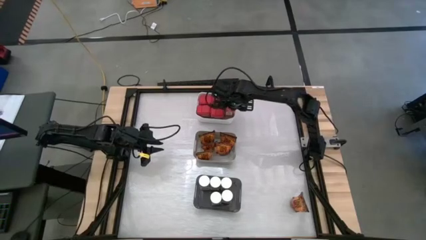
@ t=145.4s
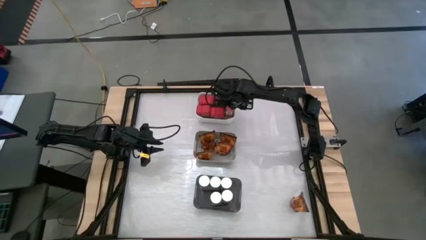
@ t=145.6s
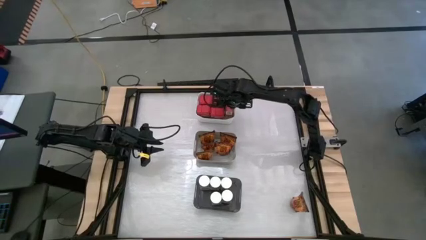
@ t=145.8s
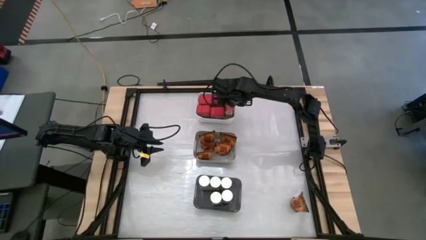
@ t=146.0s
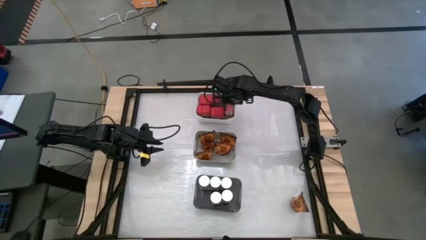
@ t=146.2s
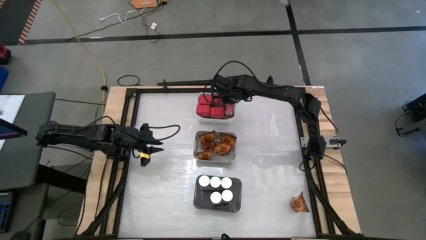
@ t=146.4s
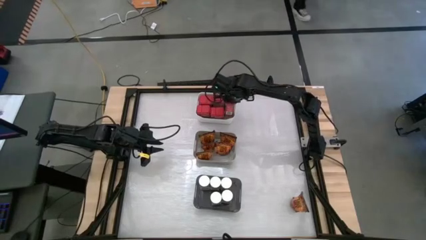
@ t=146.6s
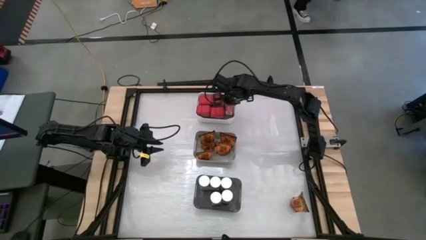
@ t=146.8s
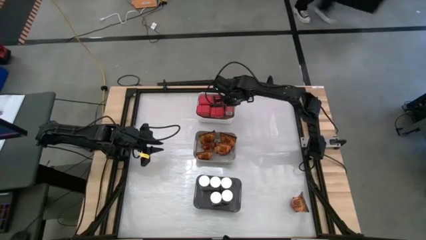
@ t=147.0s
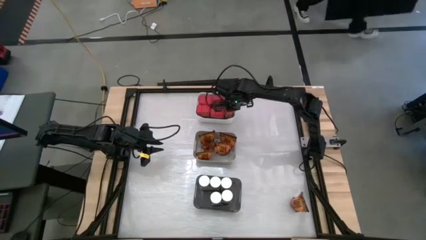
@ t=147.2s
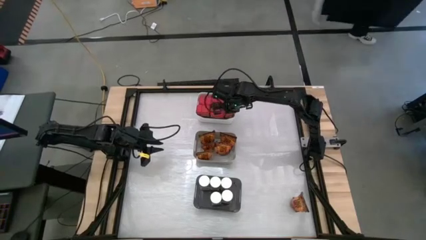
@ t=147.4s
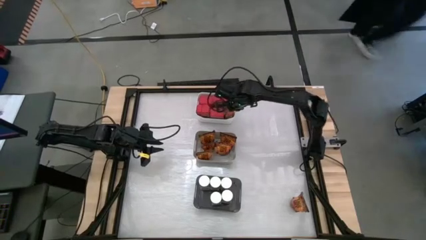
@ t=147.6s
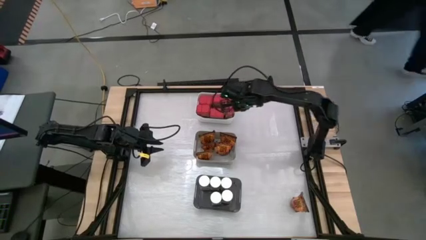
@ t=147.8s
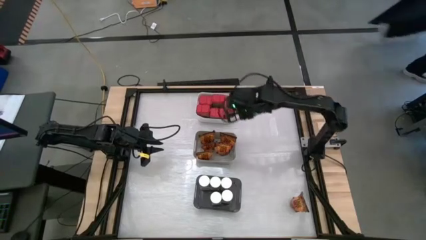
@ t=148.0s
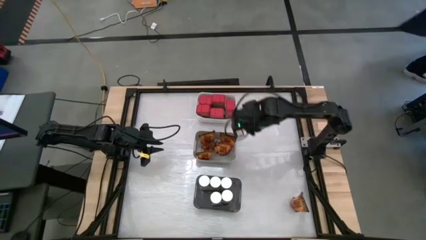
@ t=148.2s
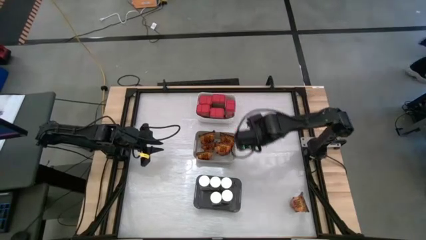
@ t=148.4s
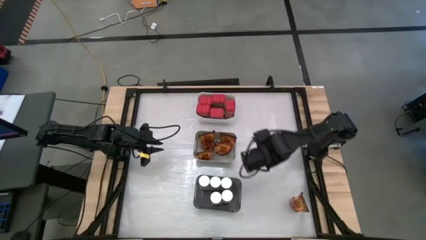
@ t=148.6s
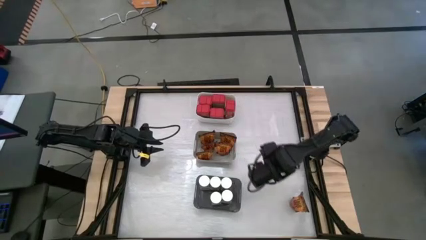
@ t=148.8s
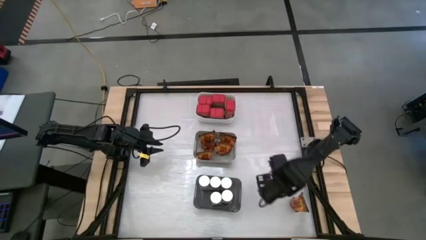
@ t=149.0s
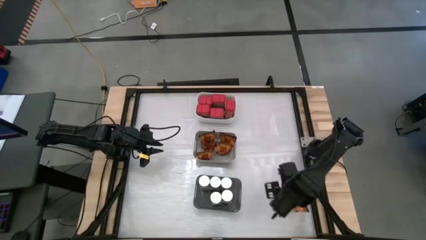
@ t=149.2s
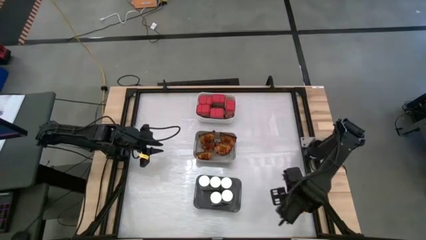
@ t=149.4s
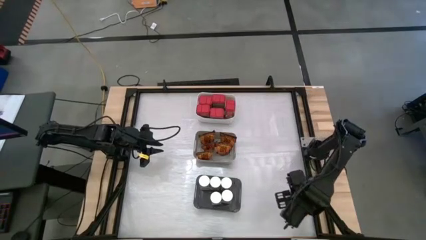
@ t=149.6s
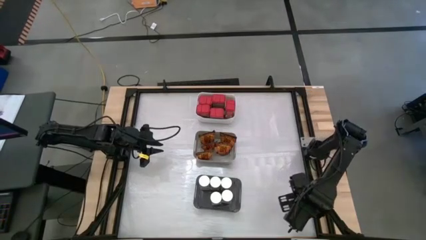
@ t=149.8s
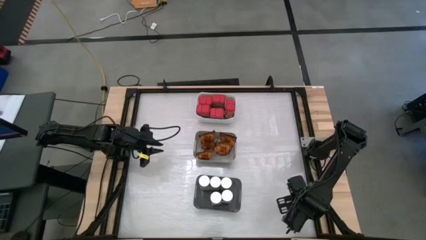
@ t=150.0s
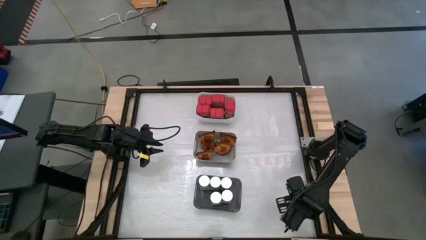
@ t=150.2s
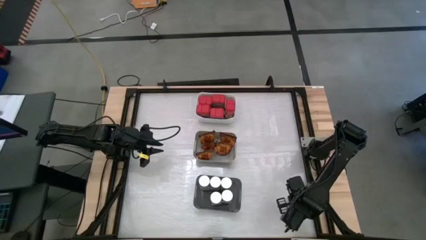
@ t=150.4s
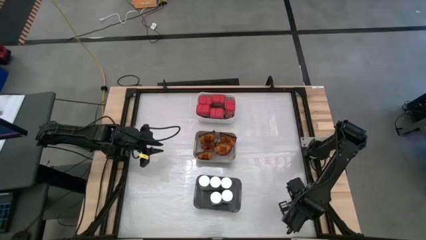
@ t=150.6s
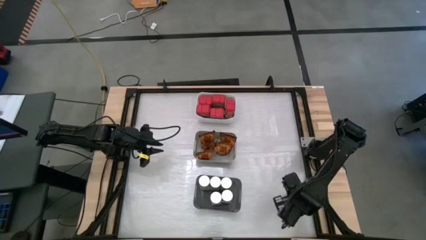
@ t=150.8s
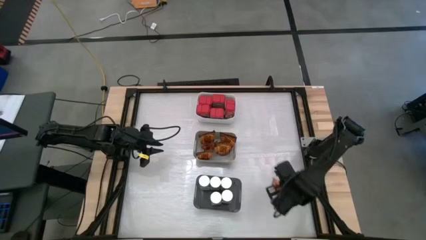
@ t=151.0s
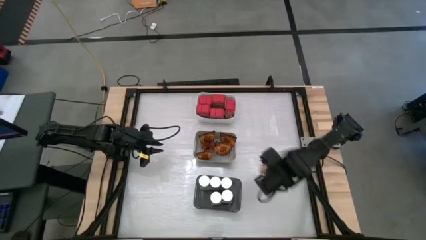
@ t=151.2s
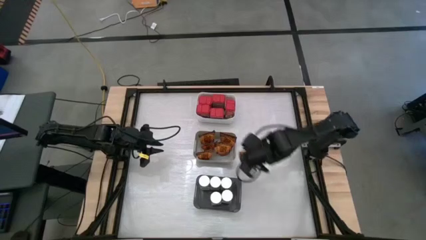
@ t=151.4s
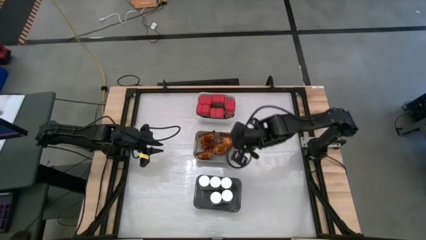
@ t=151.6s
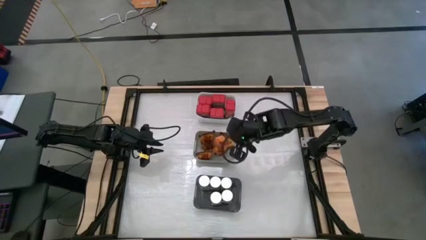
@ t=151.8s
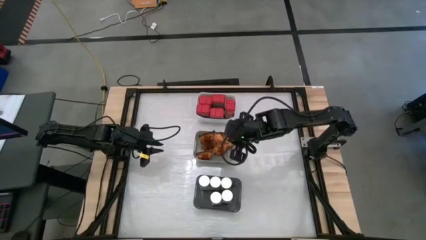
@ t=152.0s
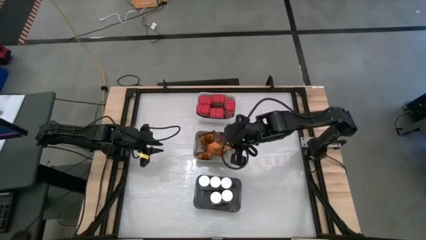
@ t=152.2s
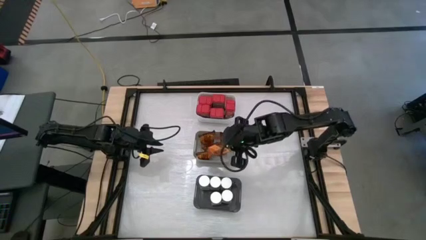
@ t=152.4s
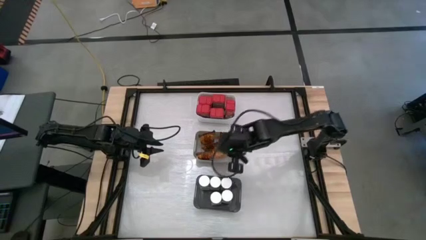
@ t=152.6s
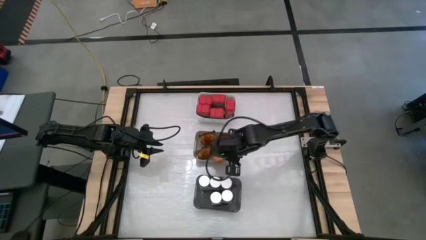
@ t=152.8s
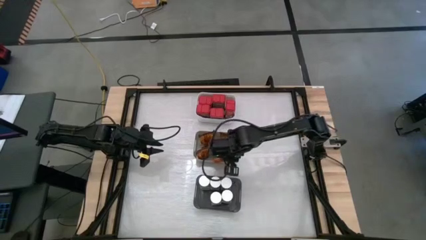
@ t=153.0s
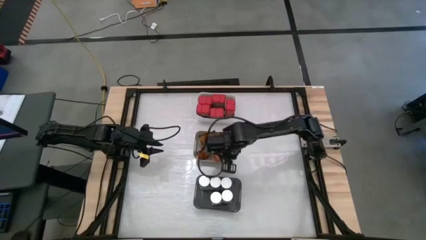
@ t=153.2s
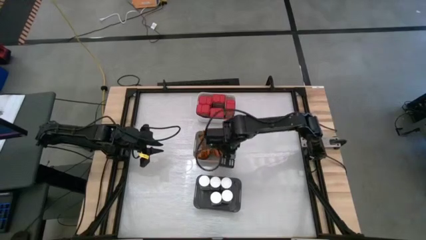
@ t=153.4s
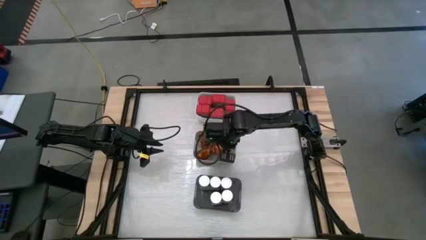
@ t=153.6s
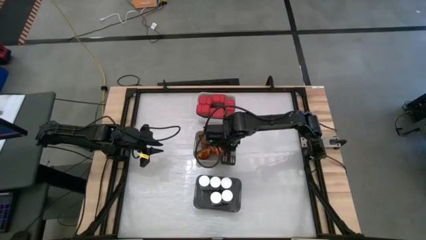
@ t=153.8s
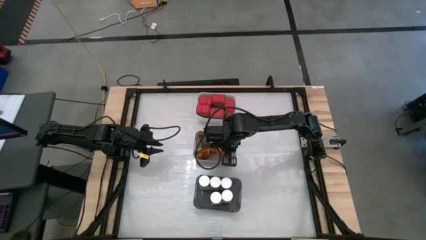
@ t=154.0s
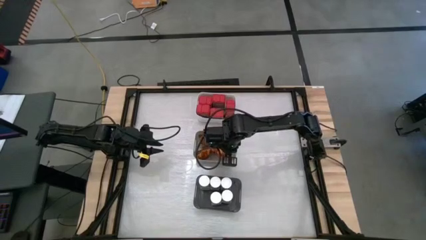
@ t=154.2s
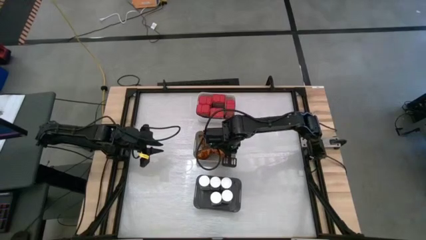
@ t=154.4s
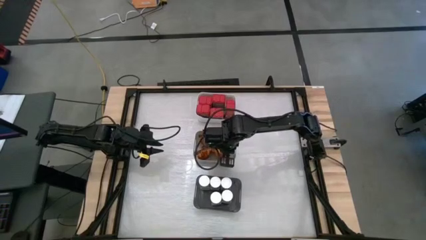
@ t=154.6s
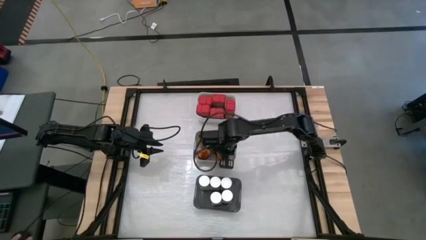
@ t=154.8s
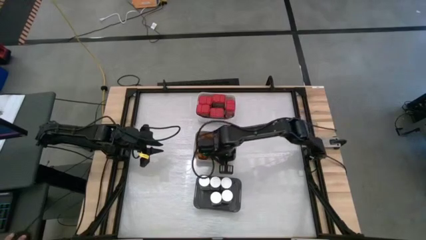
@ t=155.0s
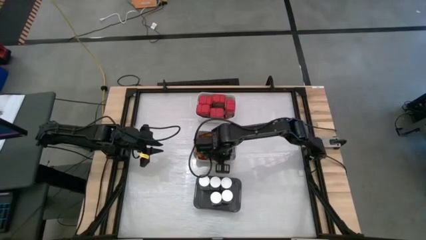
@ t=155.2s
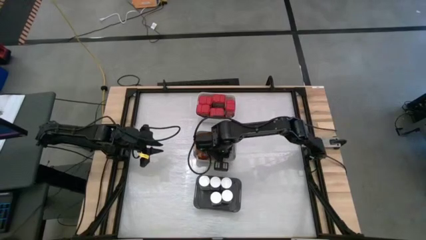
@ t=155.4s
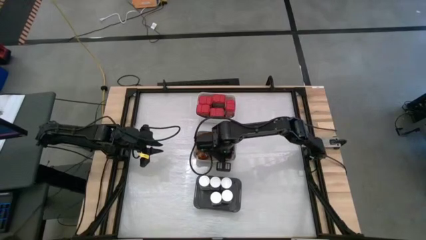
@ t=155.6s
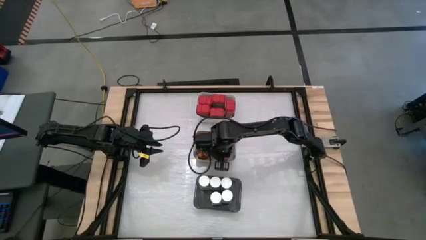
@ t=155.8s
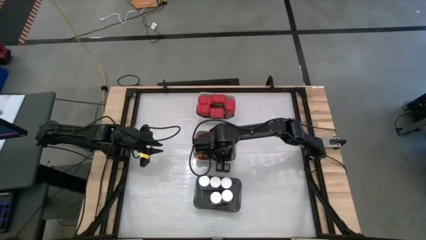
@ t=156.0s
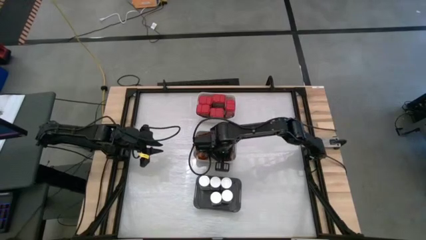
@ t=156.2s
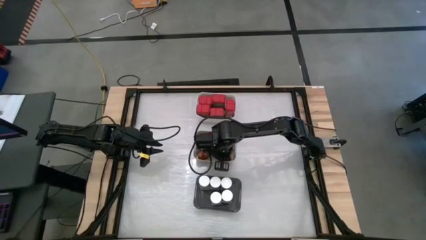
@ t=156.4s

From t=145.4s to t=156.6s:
Task: Sort spices by type
Put the orange seasoning bag into the gray bin

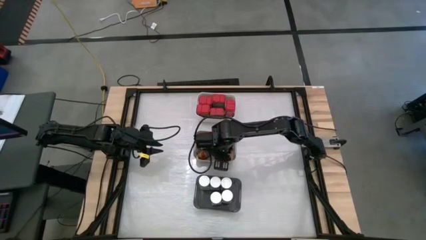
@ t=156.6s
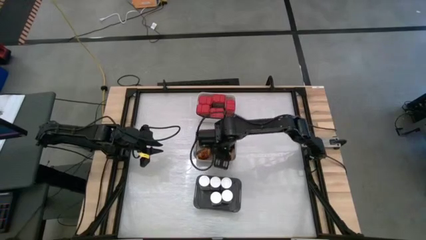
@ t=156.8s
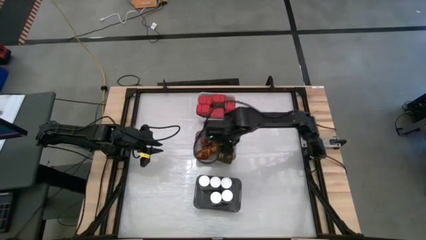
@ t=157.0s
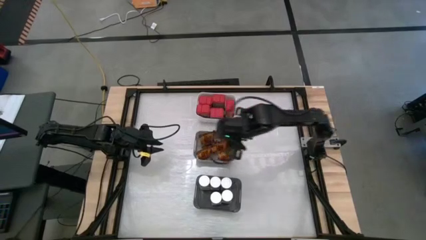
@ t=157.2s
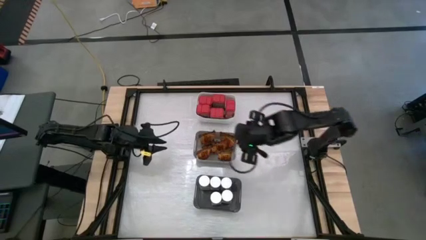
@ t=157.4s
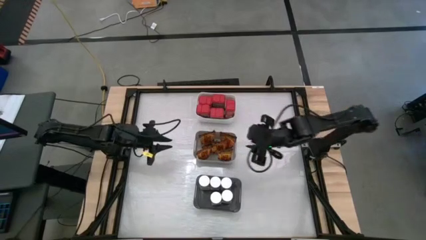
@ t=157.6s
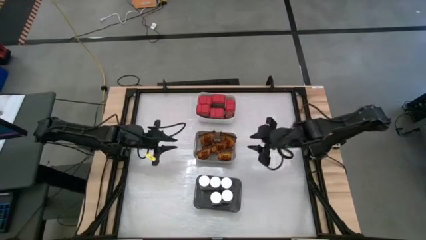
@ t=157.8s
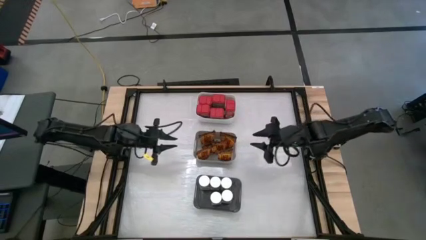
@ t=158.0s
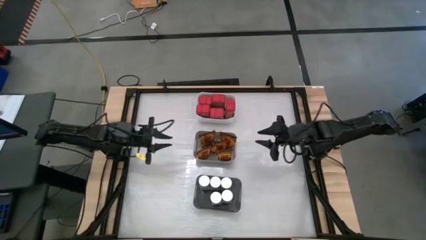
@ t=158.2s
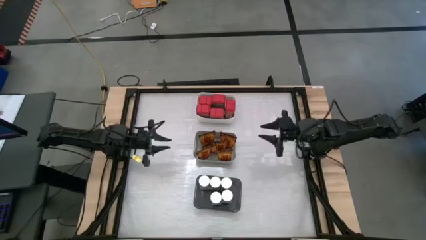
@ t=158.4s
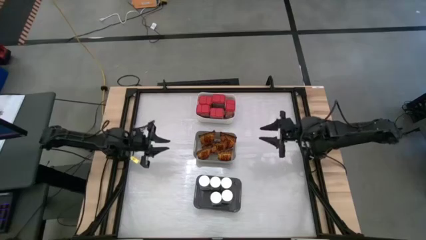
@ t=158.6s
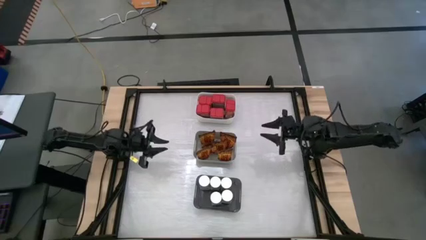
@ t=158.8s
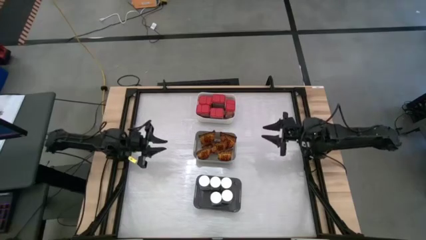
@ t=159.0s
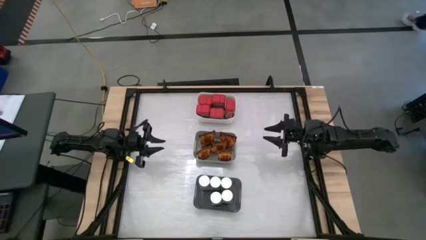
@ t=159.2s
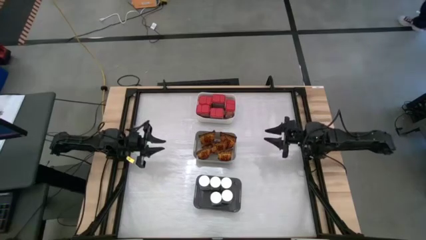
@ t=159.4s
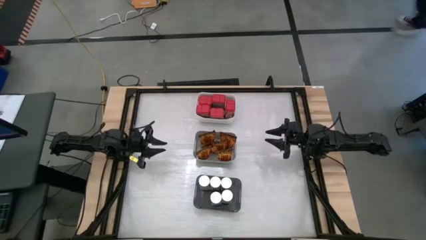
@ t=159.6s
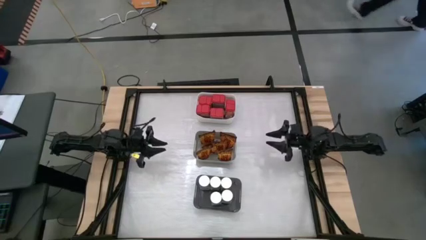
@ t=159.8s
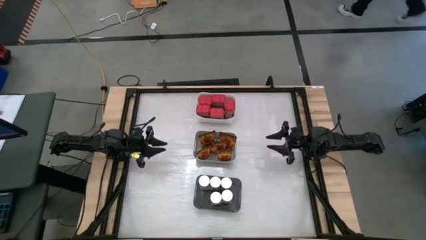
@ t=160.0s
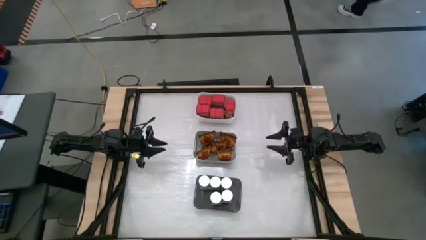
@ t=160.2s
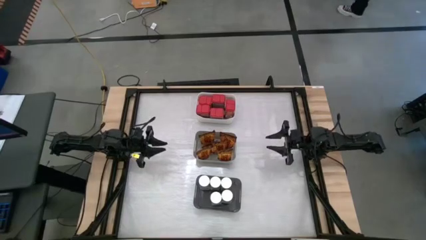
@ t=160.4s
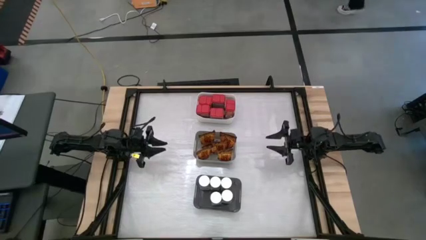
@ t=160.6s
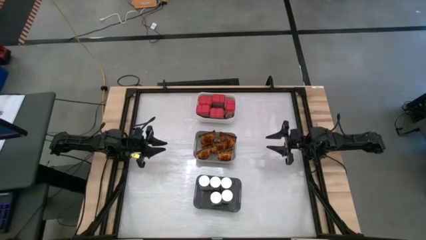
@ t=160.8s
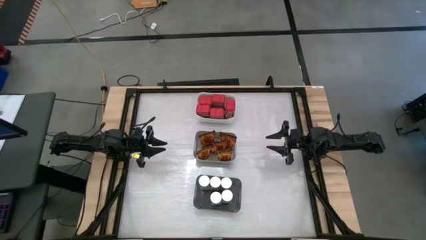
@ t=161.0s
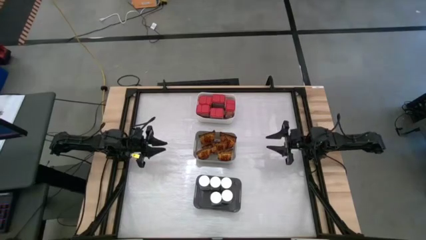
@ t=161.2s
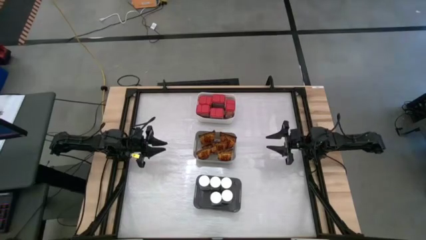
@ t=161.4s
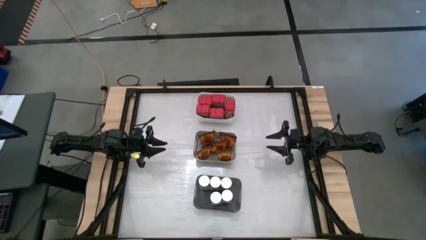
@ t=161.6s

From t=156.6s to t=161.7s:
Return to Home Position
